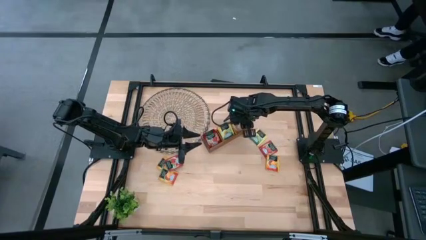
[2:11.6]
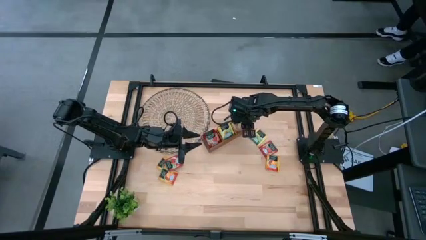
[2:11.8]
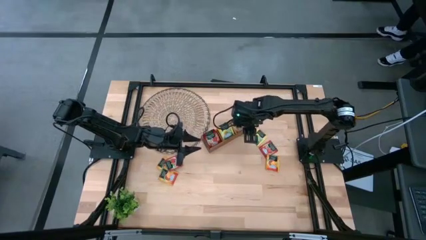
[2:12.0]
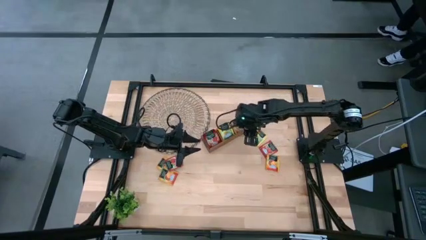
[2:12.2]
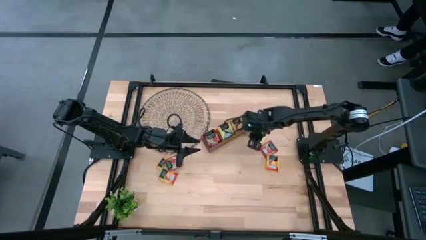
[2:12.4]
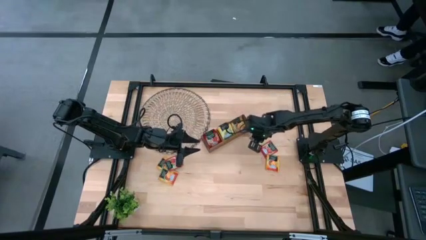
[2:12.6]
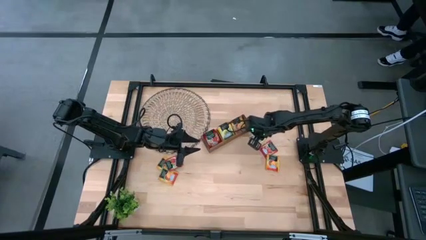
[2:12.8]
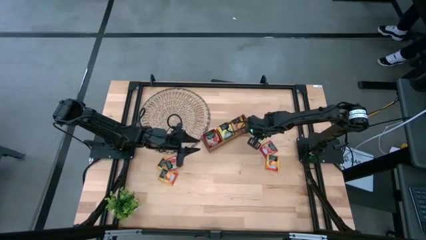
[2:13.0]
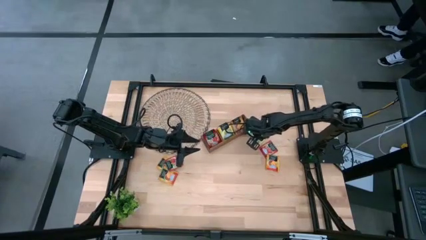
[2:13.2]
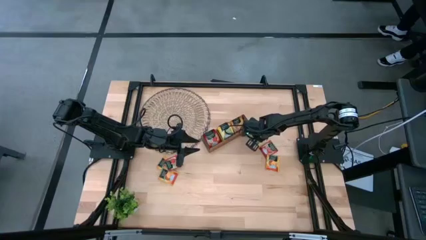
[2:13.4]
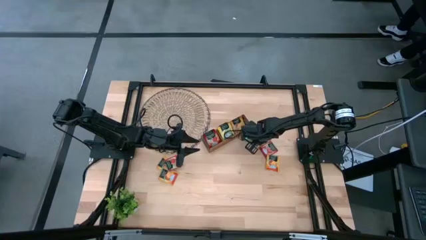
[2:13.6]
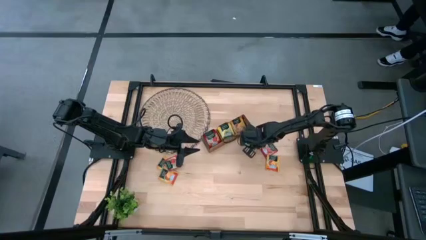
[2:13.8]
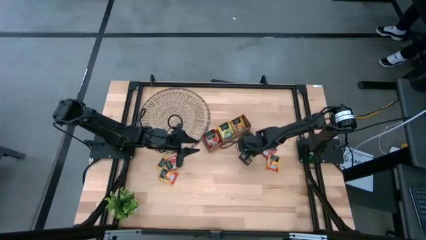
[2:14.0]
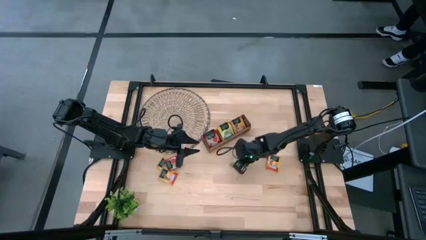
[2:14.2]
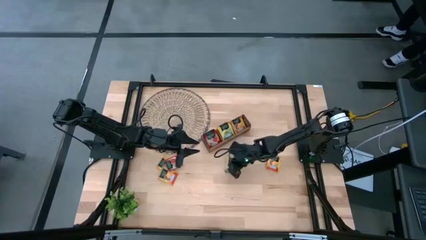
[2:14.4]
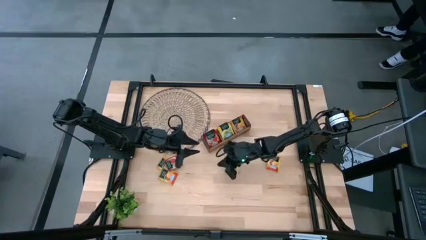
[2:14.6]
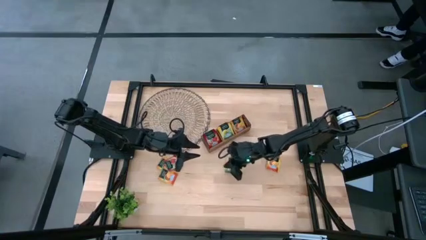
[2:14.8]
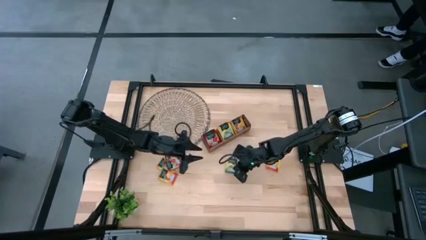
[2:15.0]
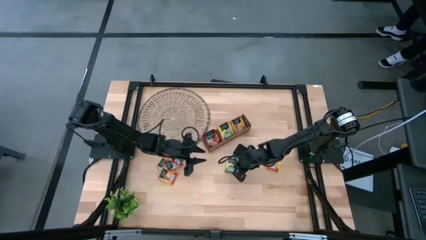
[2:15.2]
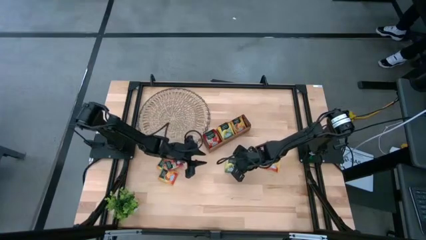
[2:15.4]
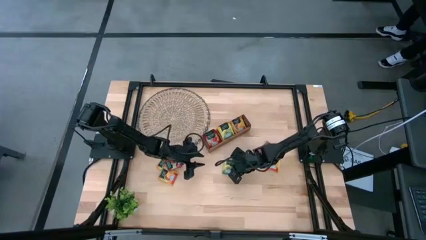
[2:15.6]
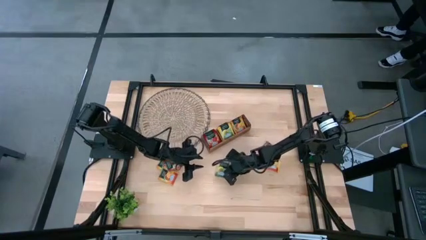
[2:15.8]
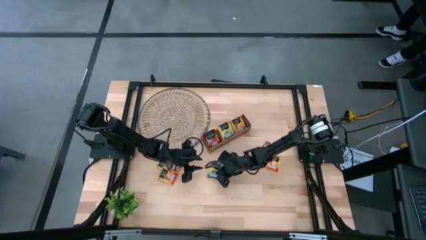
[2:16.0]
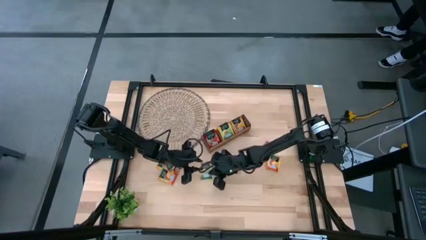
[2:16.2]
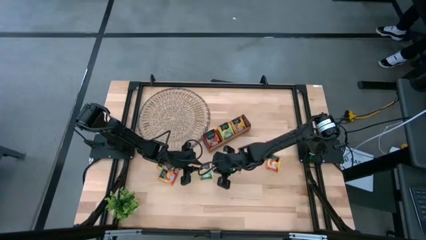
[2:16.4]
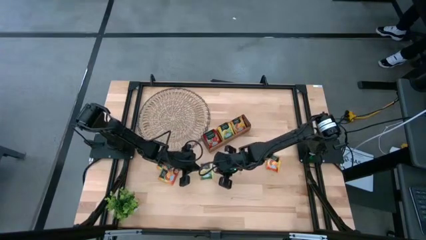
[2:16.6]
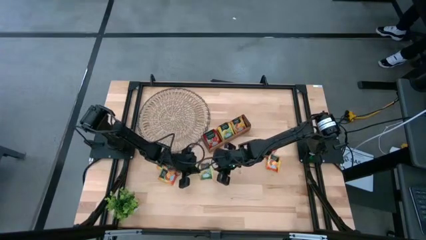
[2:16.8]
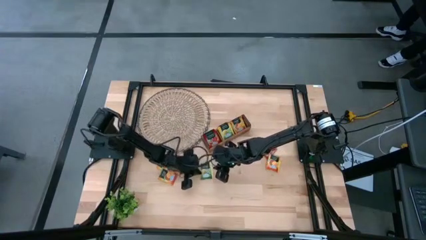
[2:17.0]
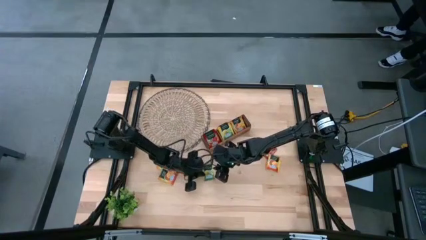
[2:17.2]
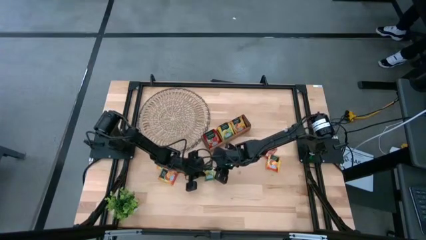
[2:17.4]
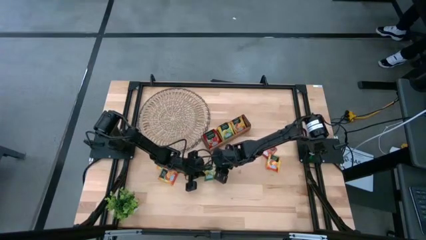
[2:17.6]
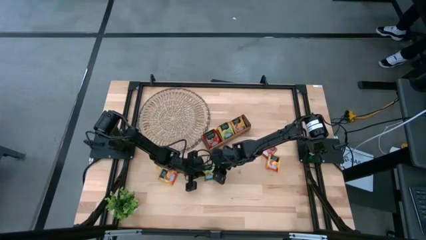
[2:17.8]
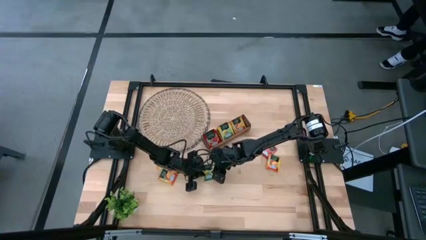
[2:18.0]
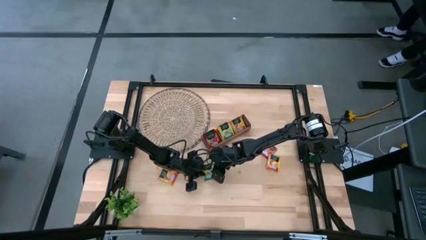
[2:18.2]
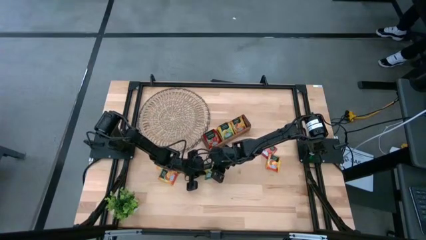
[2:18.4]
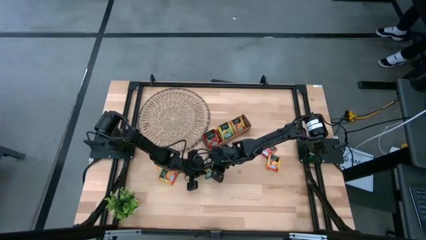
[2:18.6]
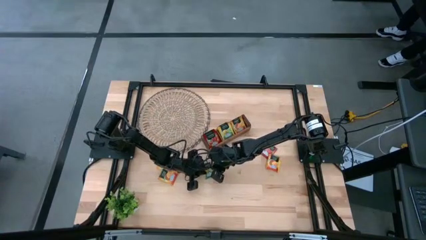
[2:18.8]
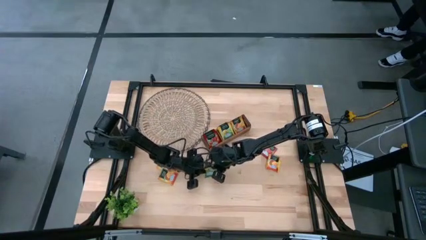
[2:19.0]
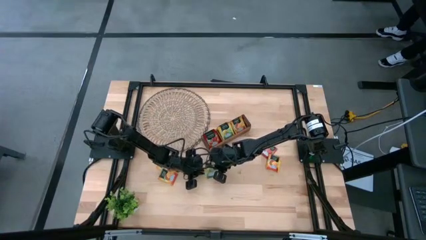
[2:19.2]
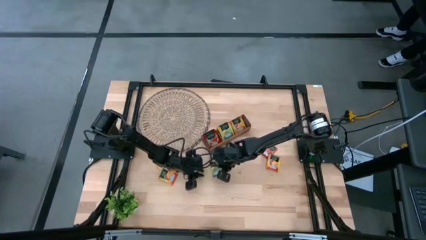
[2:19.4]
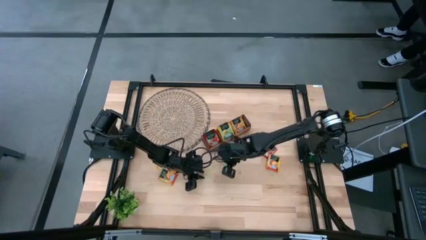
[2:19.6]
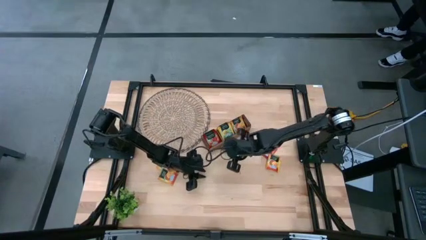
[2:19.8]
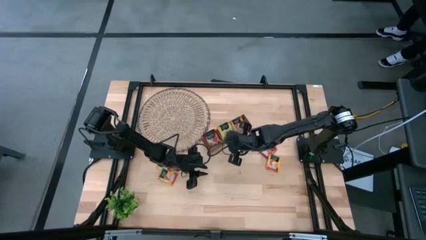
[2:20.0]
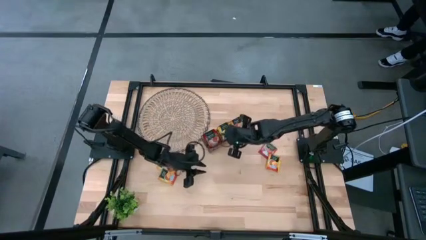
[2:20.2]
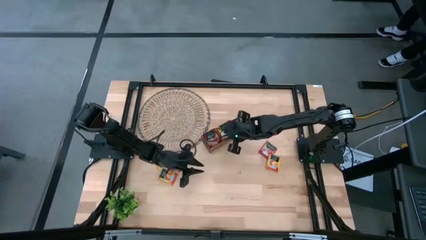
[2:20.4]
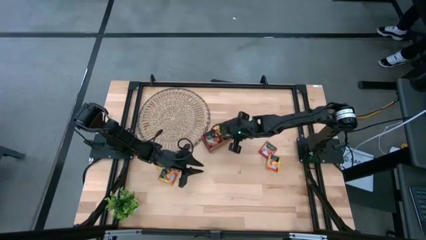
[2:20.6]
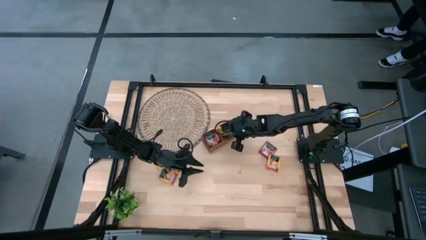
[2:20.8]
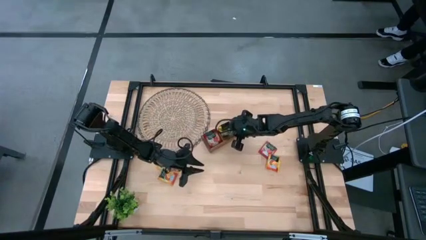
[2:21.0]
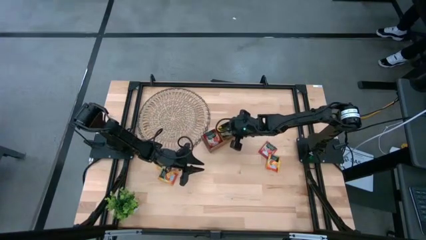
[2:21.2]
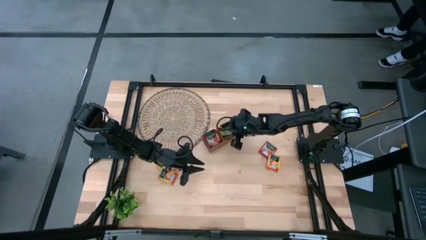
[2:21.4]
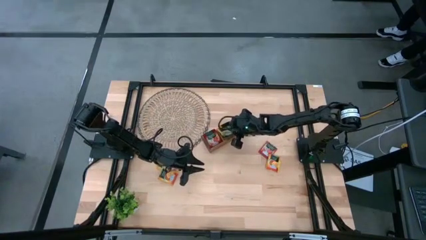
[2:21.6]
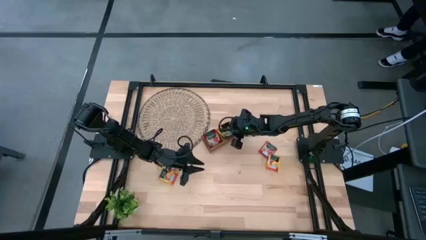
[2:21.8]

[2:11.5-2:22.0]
Task: Pick & Place Tea
Put the yellow tea bag into the middle section of the wooden organizer

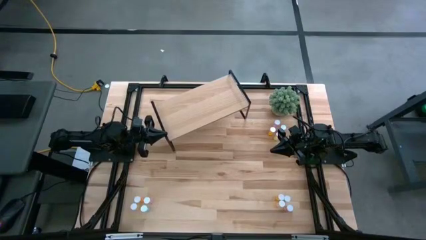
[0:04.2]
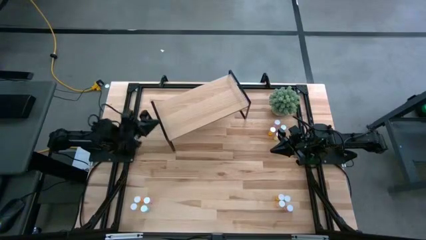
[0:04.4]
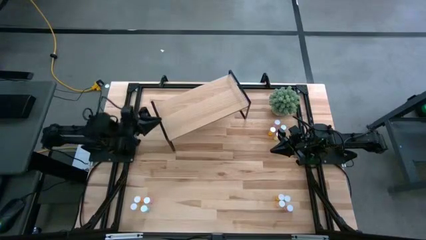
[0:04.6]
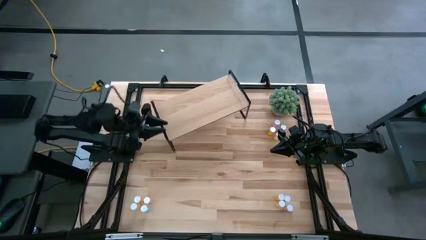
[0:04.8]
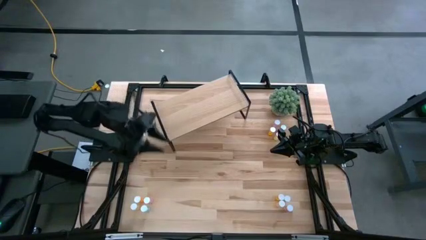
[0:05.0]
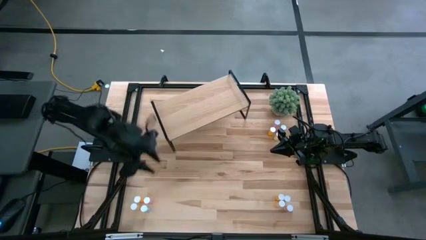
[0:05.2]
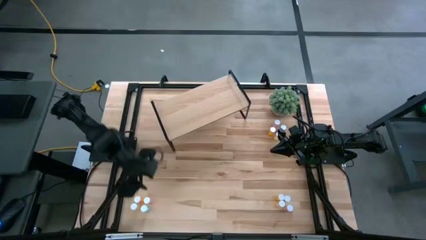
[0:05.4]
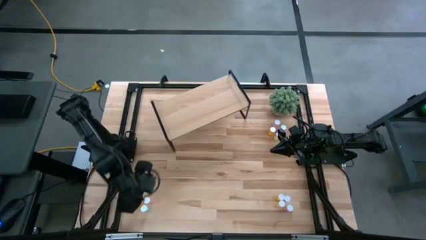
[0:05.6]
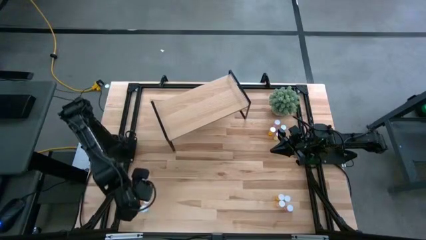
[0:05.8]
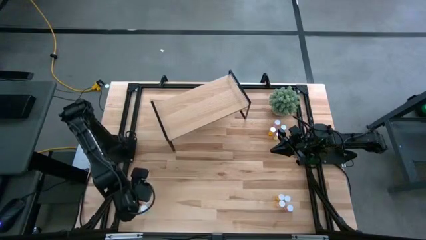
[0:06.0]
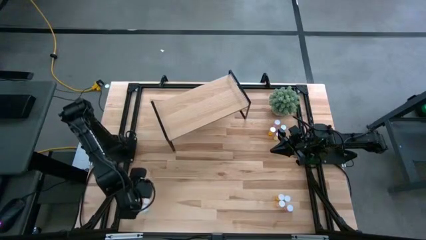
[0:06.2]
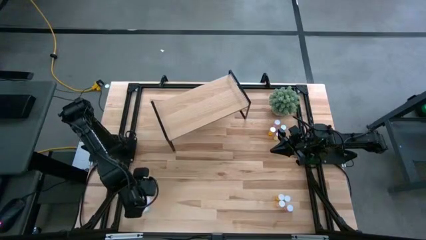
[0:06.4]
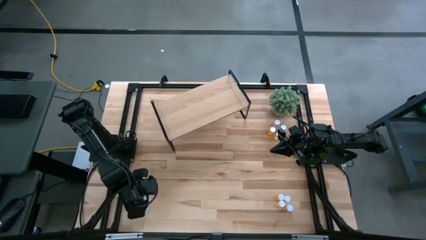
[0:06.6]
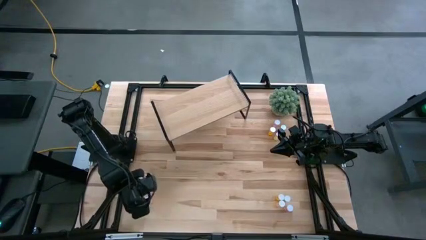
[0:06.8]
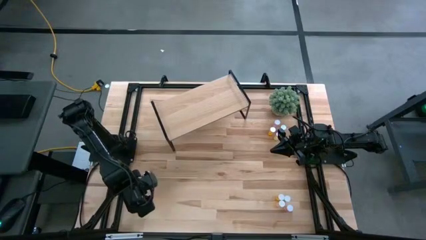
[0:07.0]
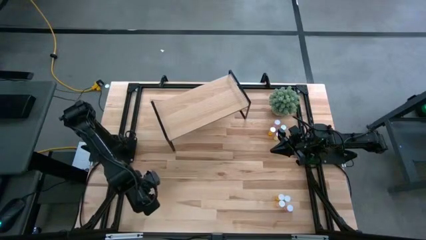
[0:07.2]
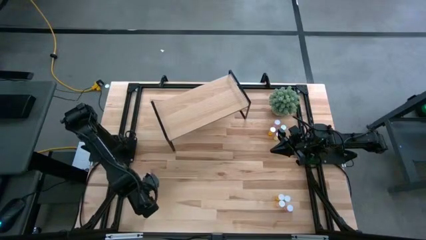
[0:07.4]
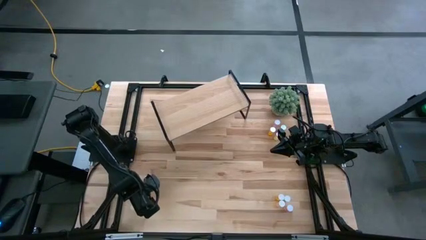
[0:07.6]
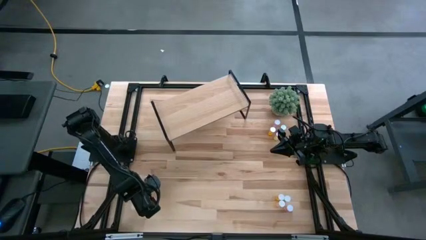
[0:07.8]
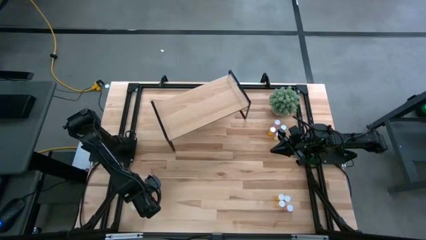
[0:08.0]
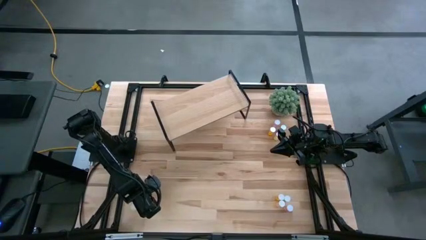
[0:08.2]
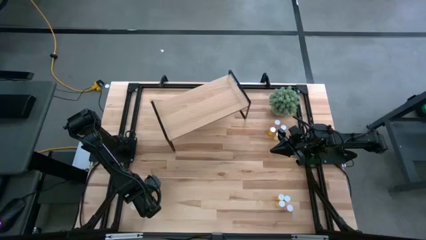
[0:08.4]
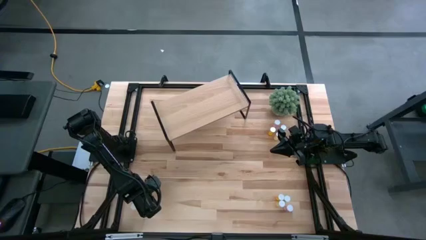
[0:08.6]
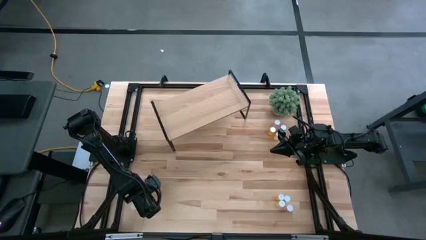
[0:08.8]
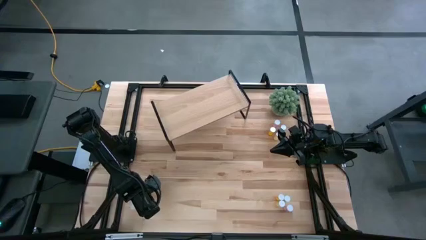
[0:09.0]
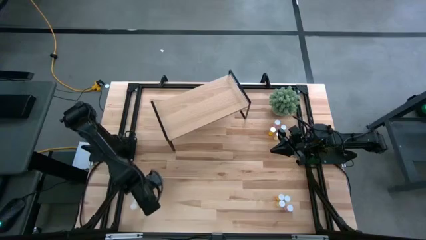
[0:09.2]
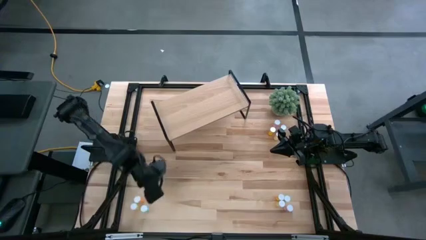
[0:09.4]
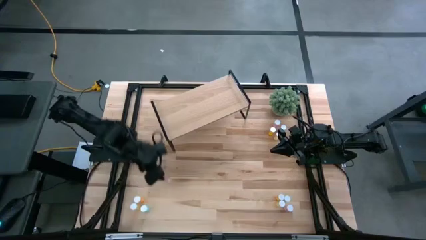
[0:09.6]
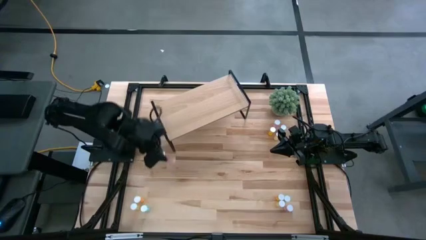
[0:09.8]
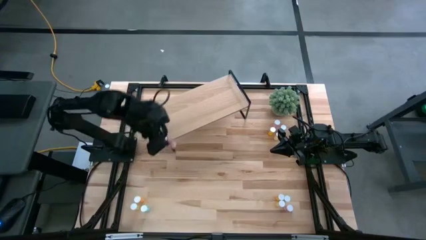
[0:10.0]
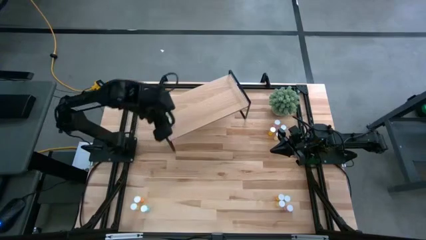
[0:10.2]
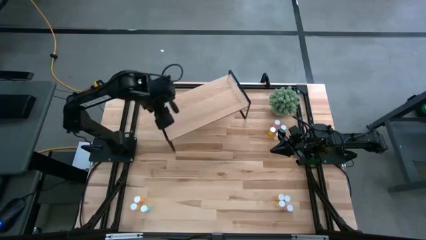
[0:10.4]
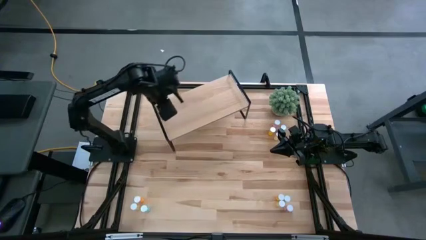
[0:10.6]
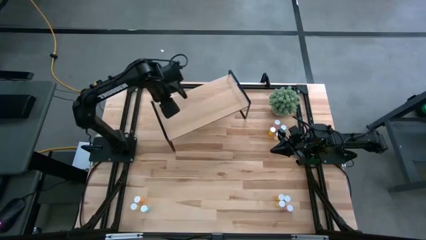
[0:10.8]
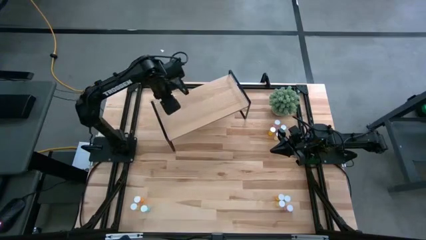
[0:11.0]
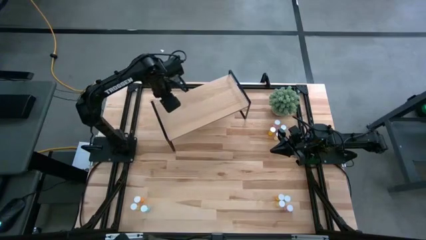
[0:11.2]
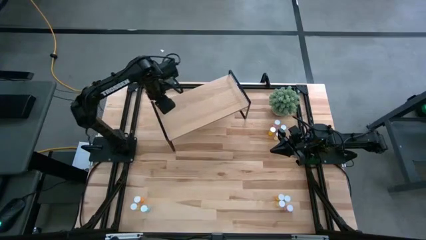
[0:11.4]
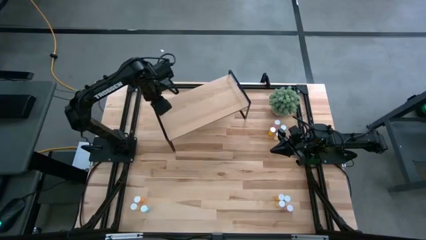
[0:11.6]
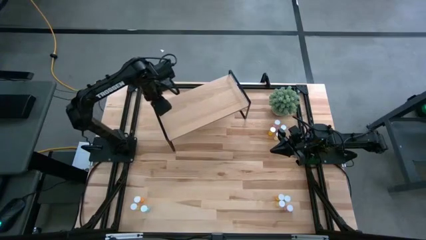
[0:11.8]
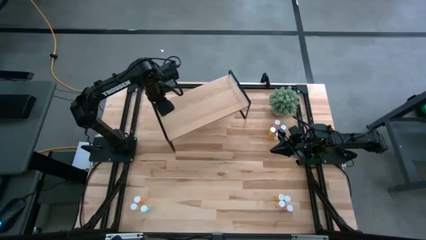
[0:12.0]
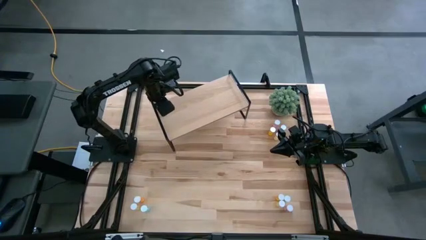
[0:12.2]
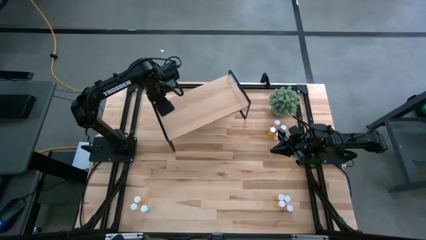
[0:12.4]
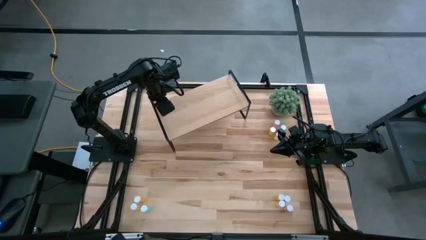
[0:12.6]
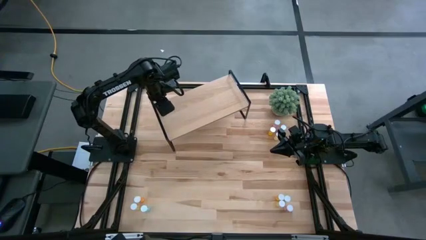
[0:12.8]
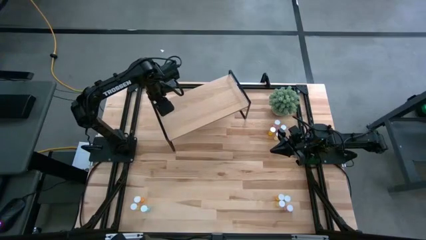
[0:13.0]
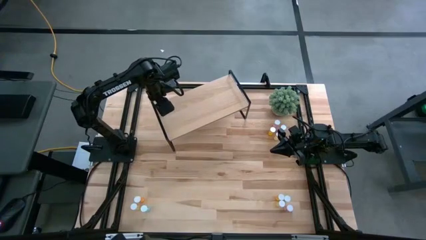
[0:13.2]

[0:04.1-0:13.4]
Task: Pick and place medicine bottles onto shelf by color
Put the bottom left pink pill bottle on the shelf
